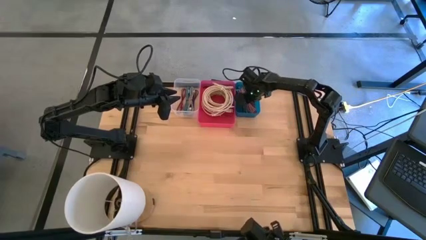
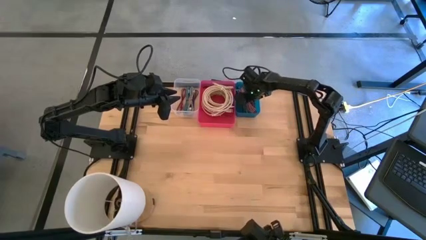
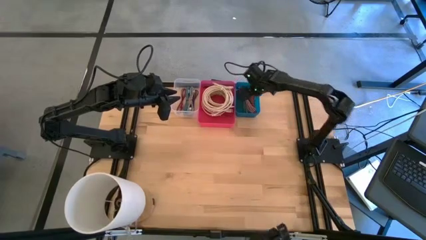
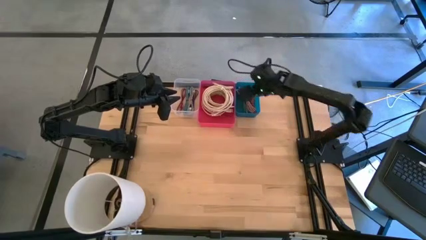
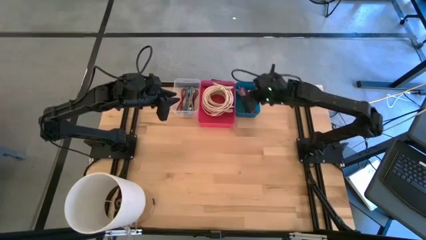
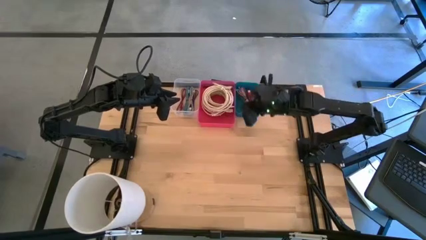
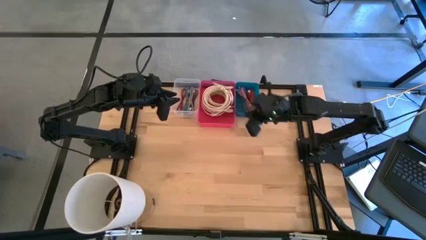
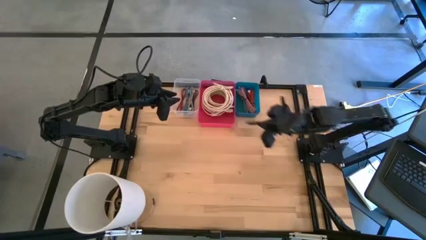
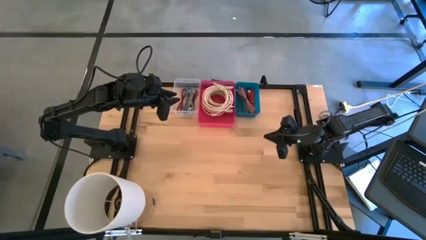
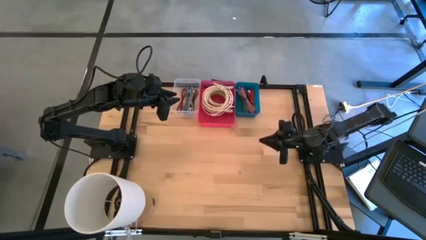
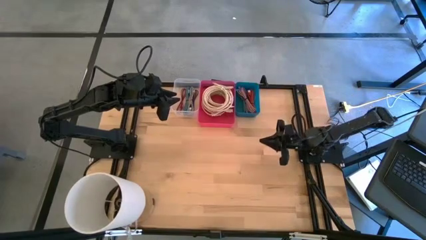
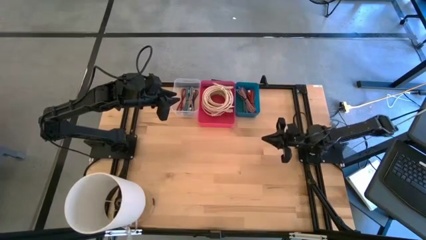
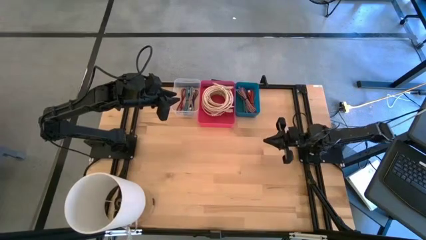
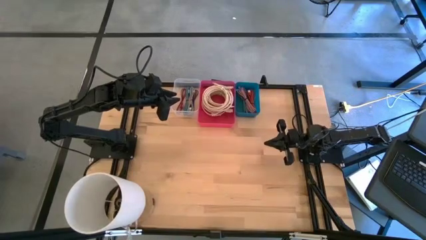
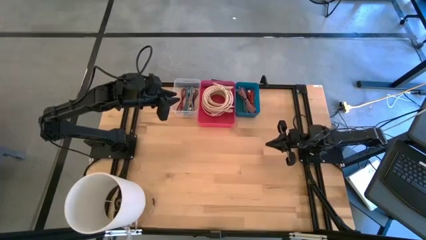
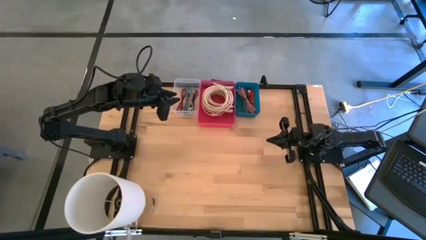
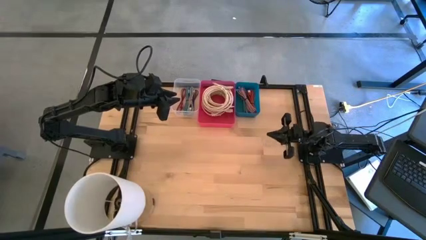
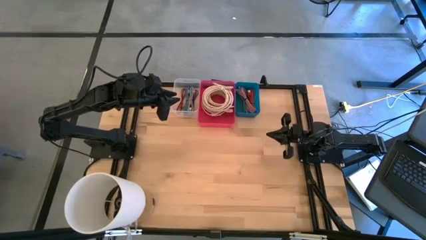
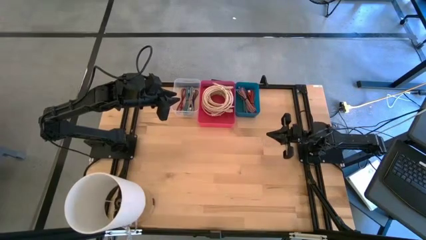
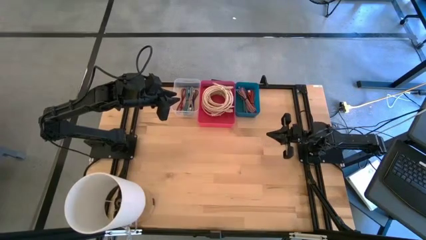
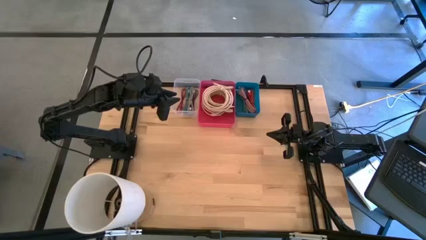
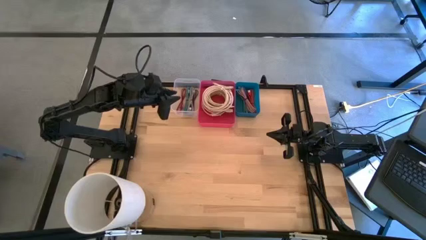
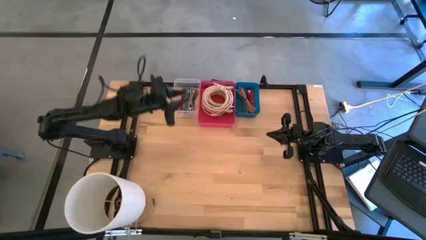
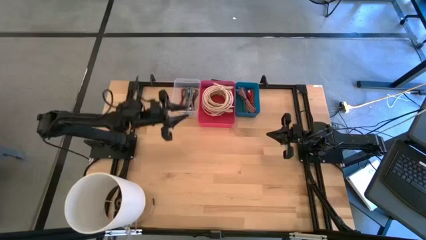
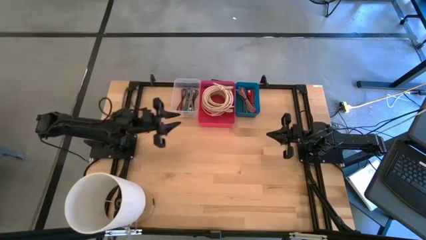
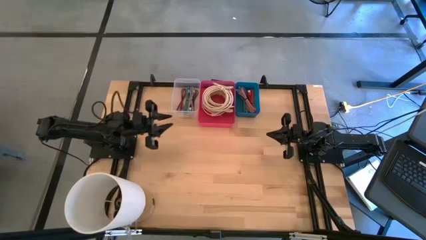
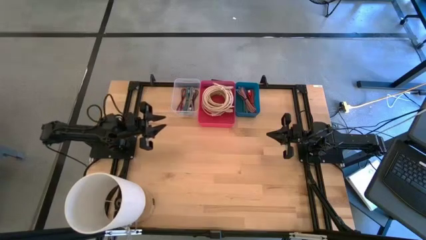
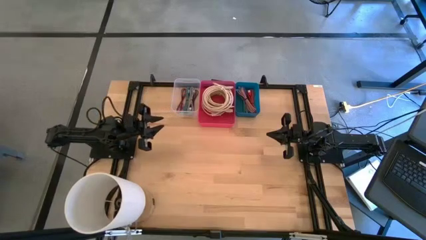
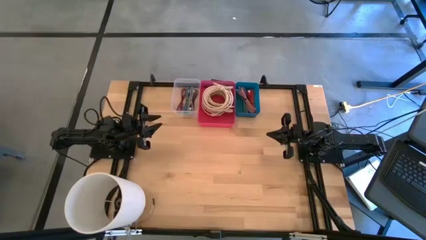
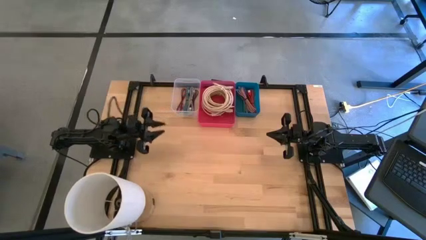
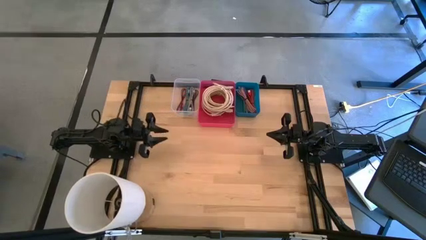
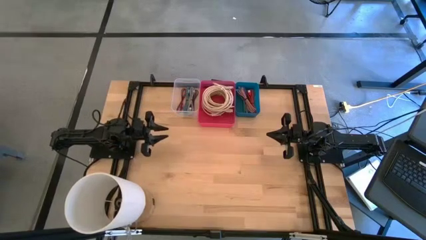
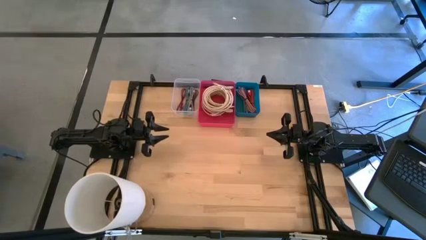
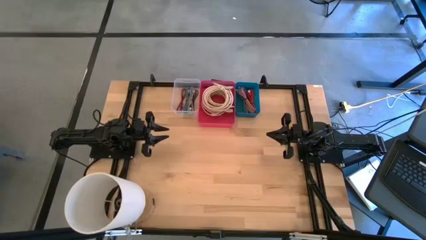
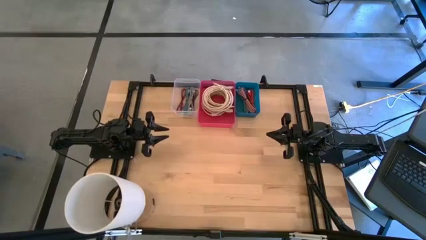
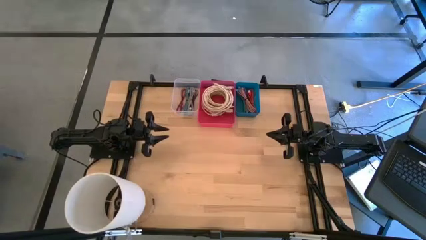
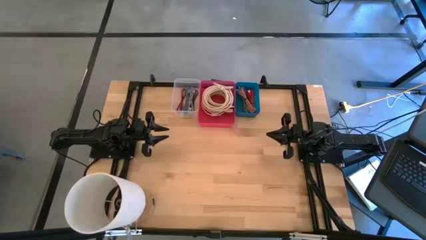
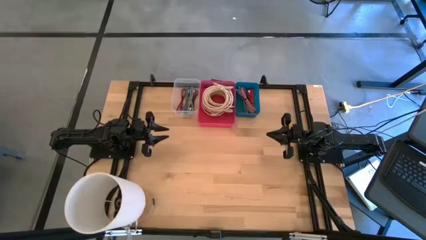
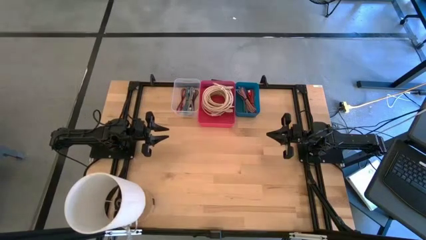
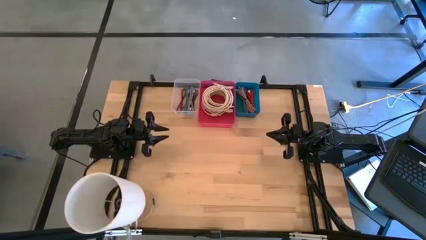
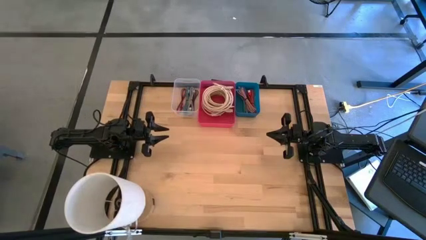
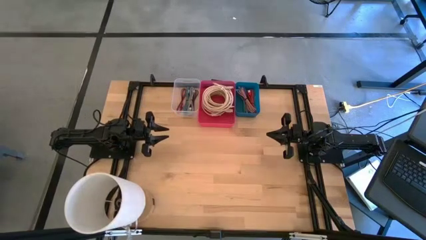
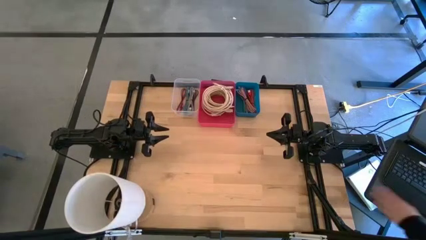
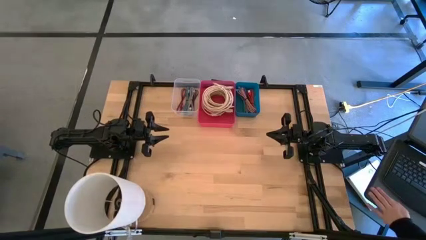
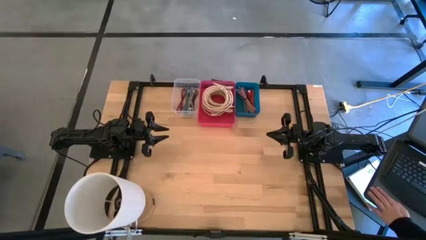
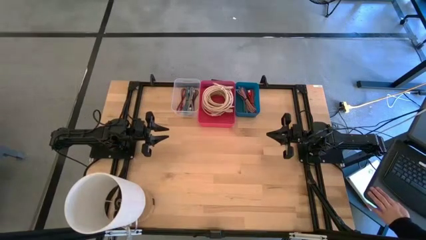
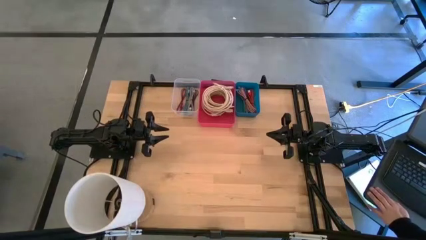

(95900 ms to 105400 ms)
Task: Pick & Place USB Port
Return to Home Position

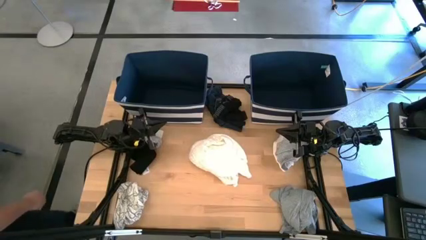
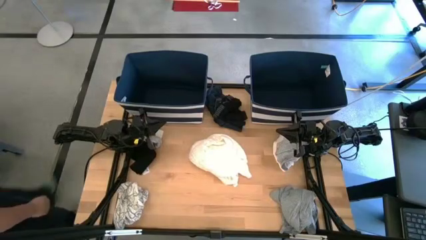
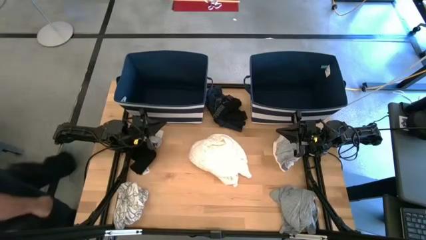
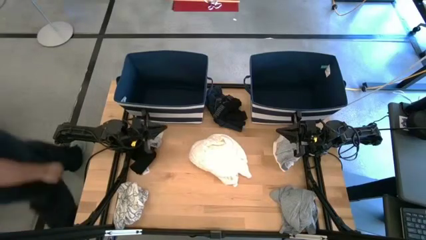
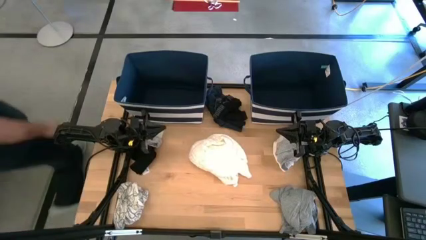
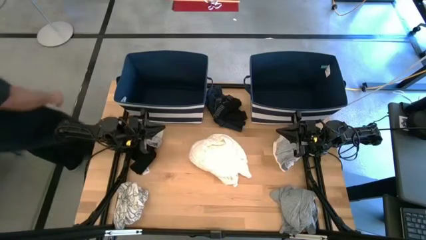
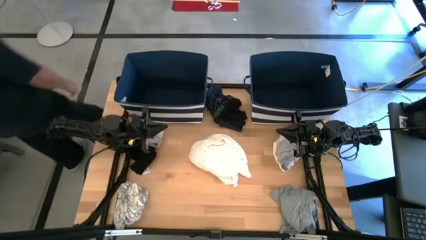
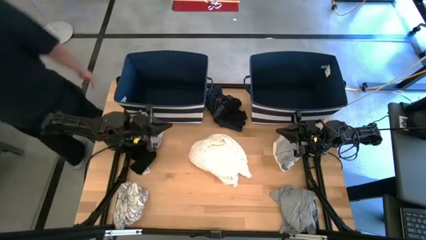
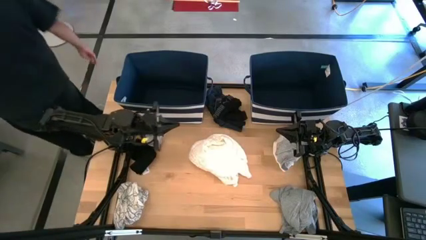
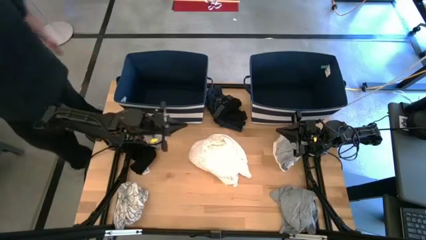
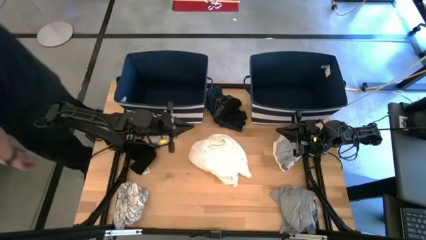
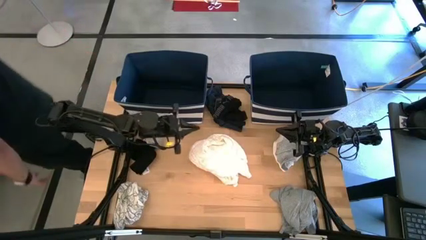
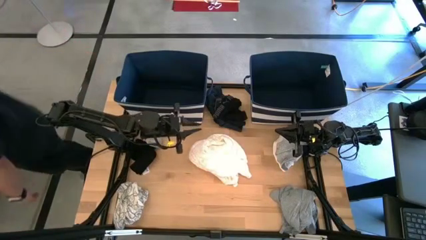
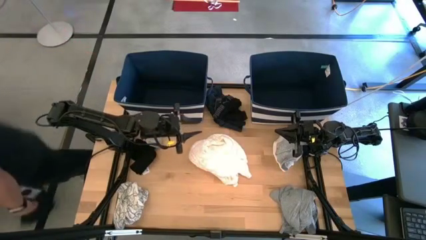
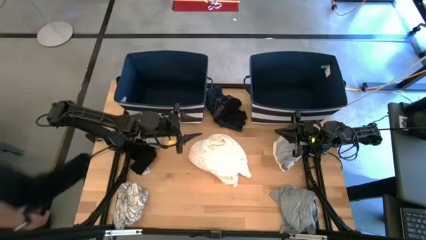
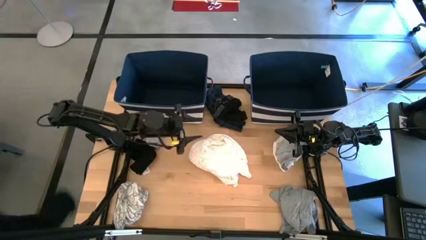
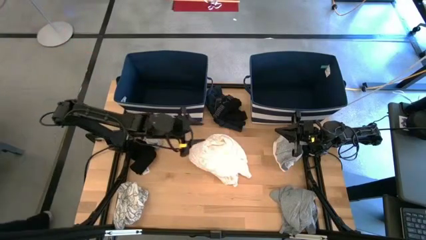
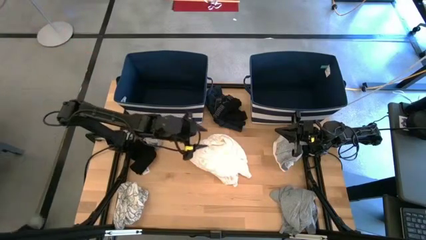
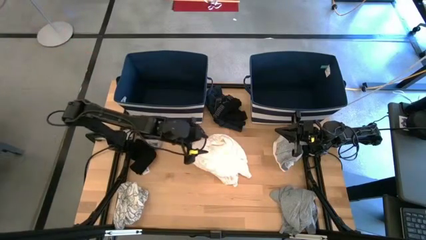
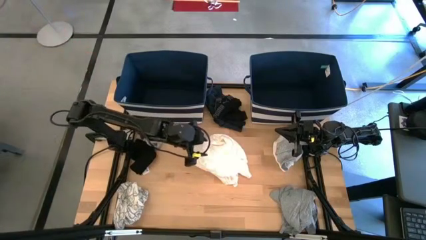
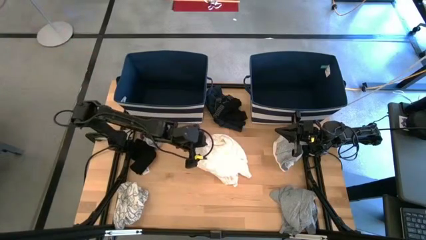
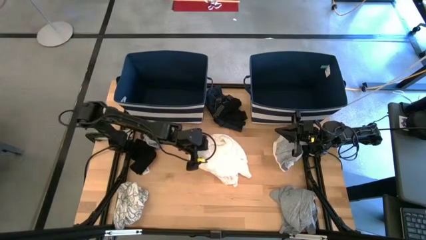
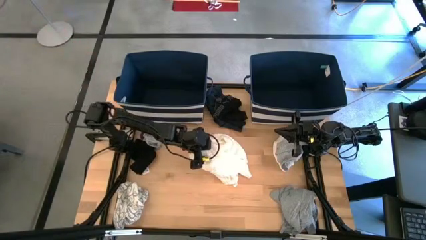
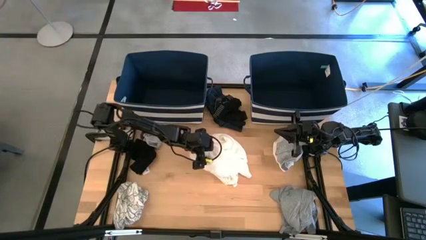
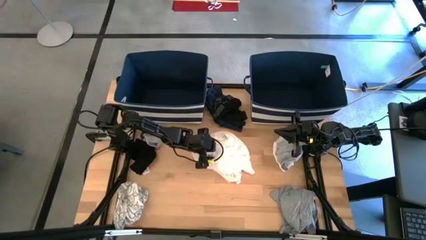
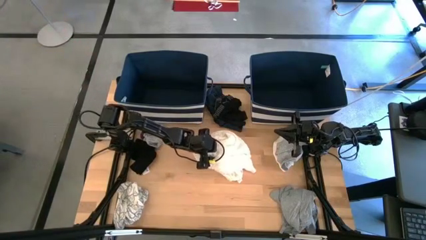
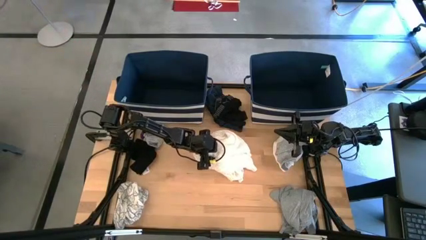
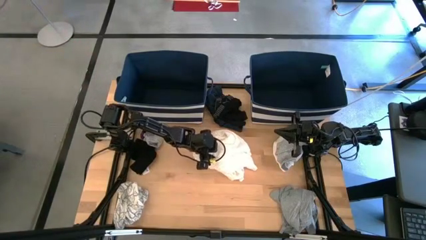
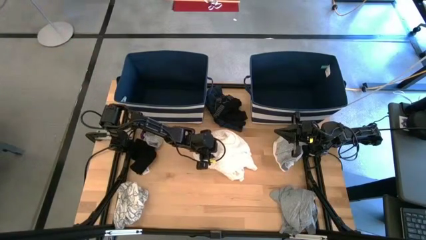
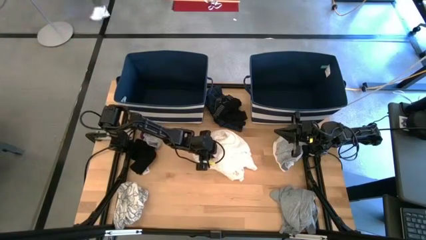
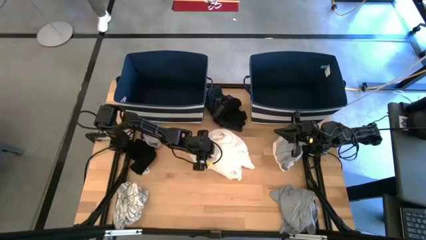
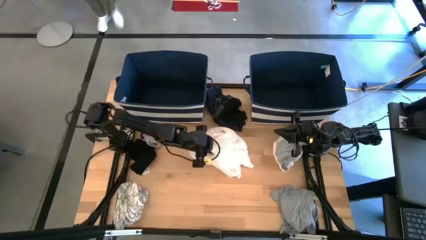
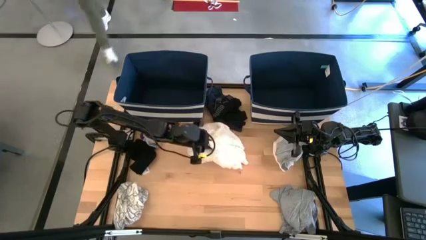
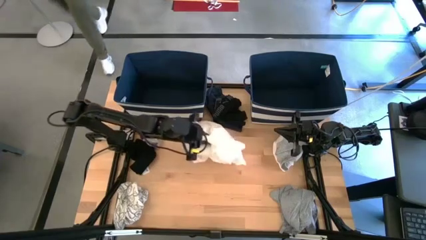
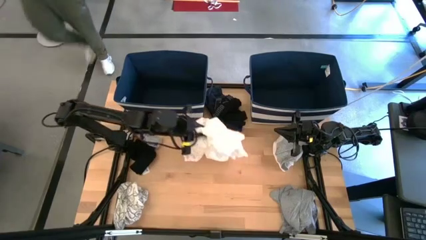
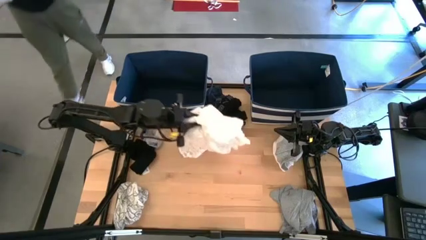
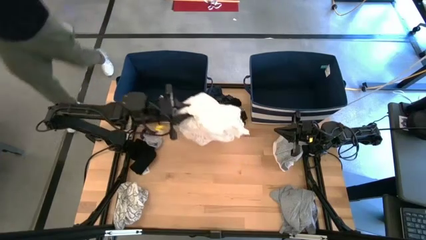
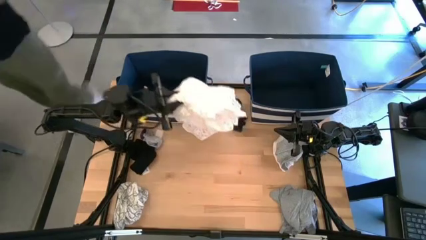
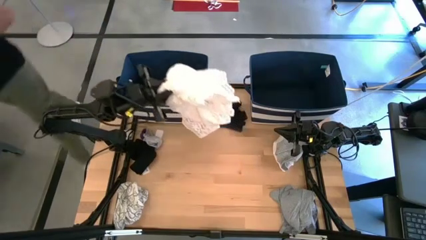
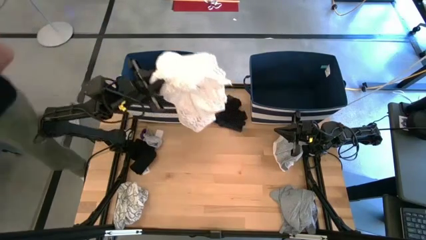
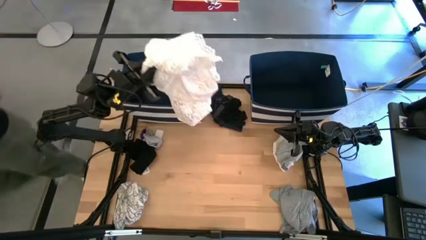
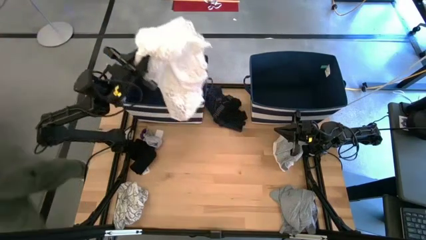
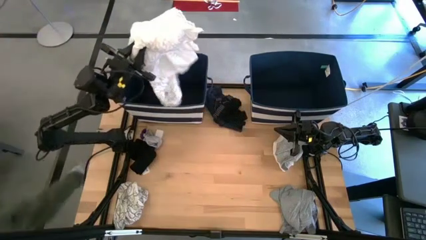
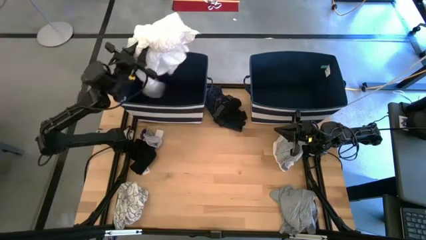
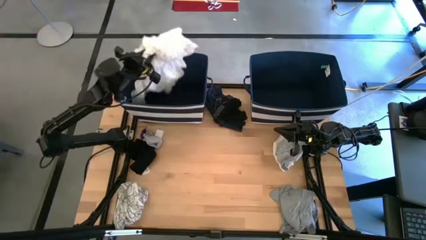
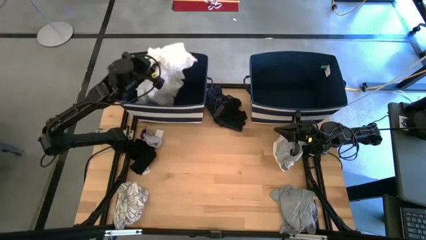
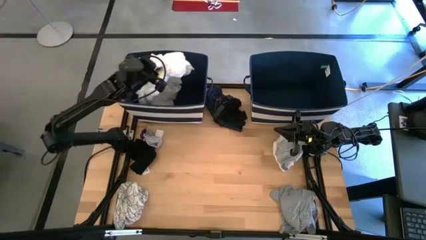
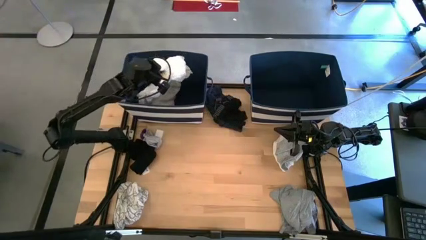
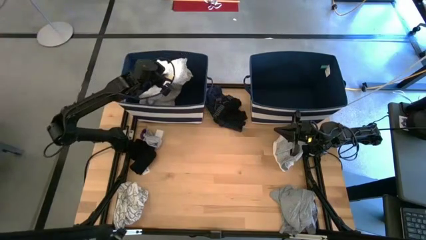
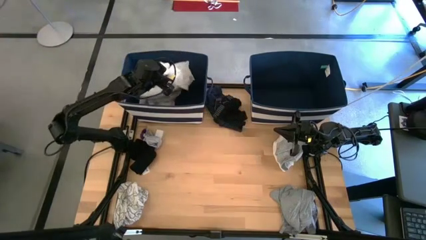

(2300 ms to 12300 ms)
Task: Sort clothes
Put the white dress into the left blue bin
